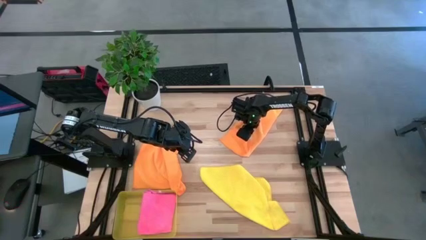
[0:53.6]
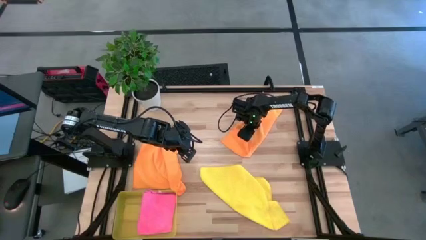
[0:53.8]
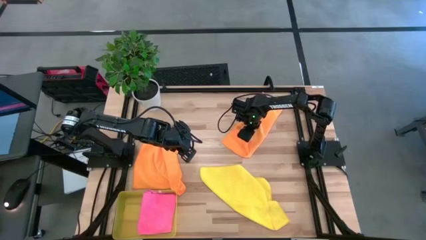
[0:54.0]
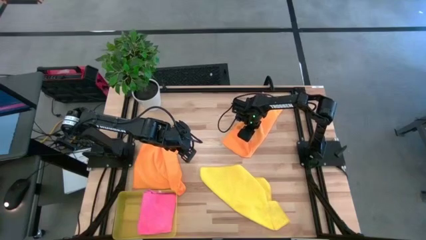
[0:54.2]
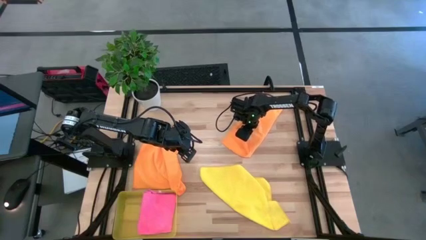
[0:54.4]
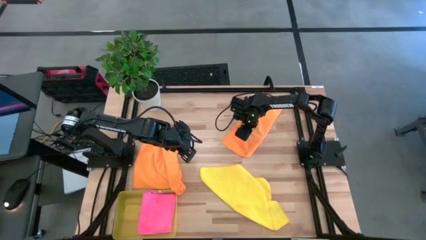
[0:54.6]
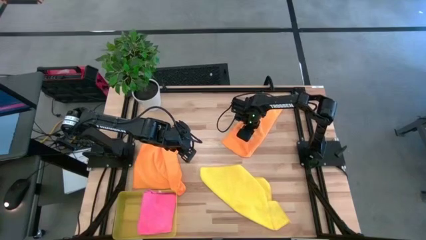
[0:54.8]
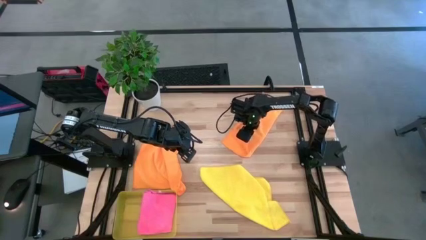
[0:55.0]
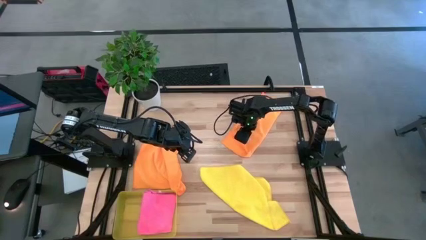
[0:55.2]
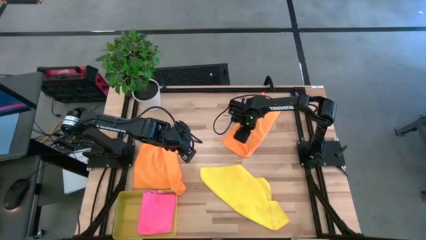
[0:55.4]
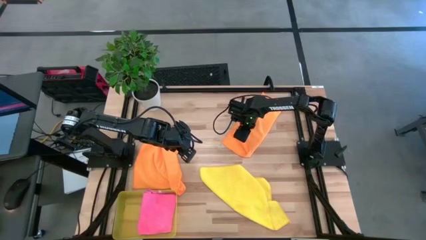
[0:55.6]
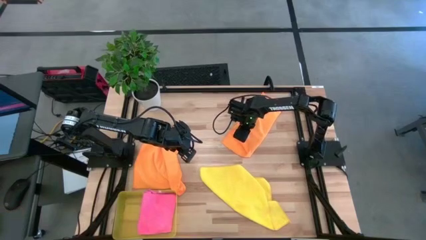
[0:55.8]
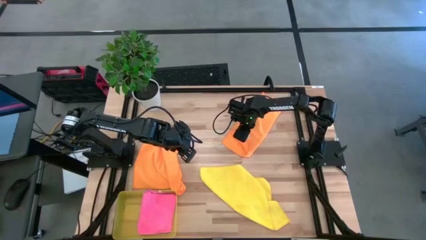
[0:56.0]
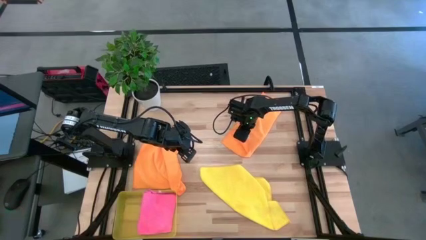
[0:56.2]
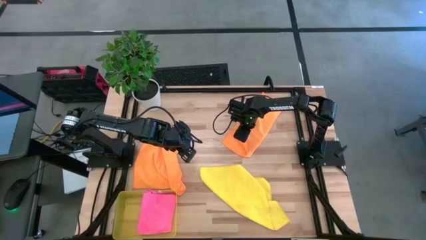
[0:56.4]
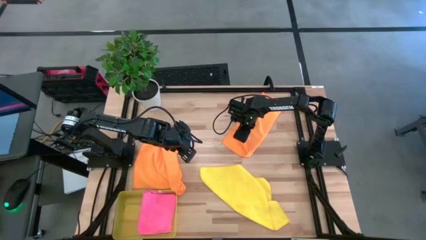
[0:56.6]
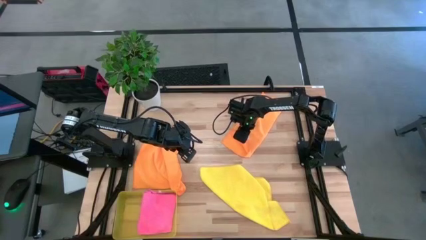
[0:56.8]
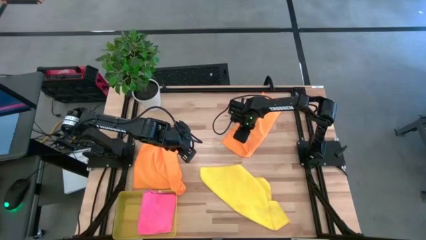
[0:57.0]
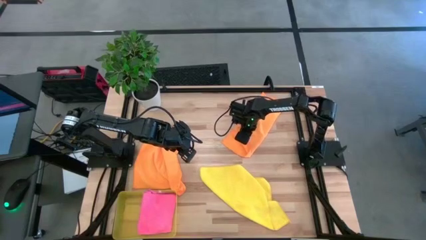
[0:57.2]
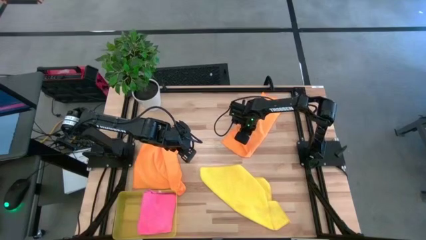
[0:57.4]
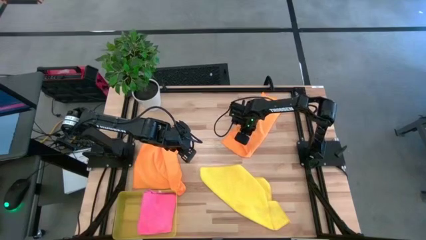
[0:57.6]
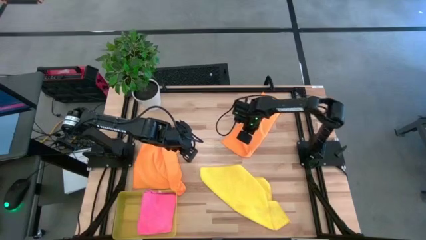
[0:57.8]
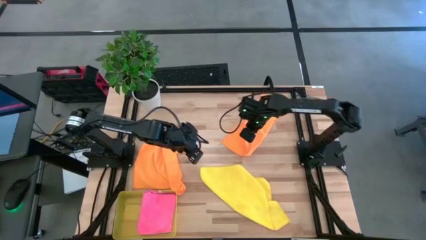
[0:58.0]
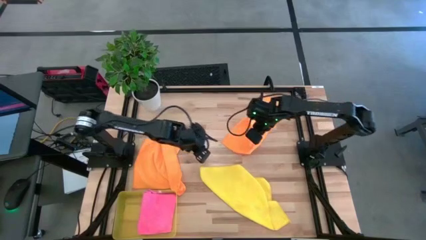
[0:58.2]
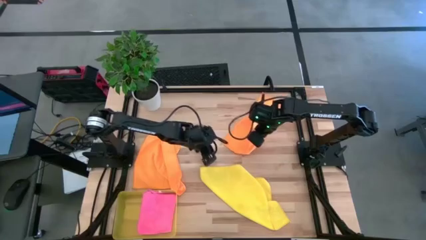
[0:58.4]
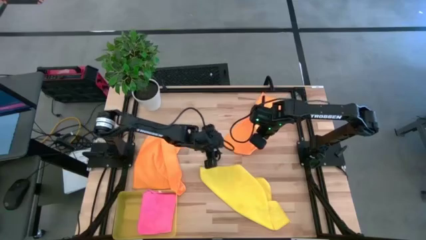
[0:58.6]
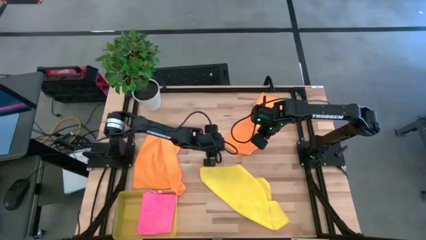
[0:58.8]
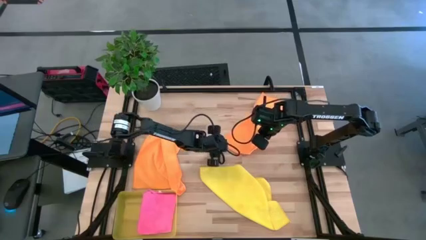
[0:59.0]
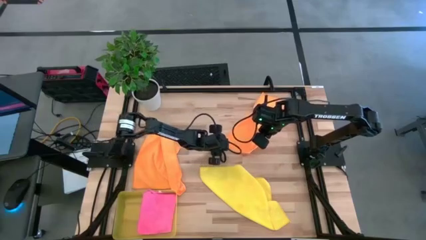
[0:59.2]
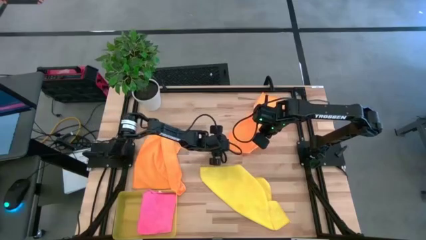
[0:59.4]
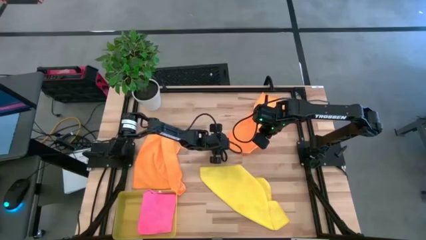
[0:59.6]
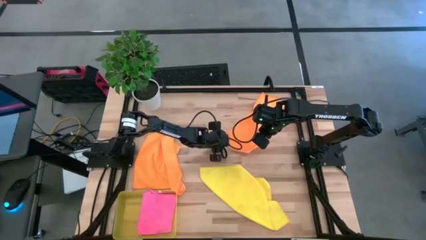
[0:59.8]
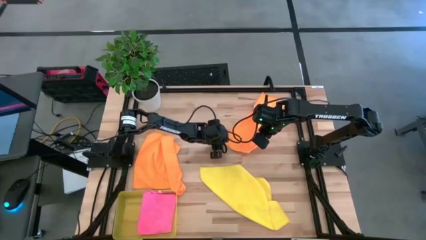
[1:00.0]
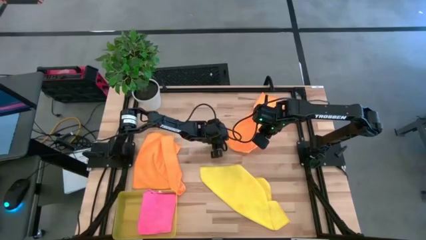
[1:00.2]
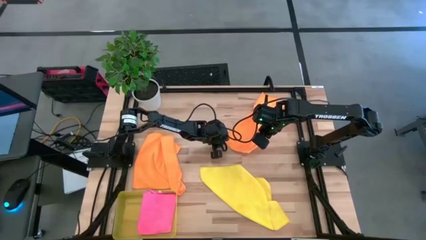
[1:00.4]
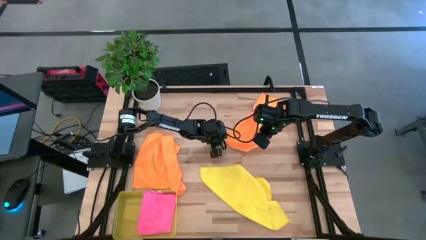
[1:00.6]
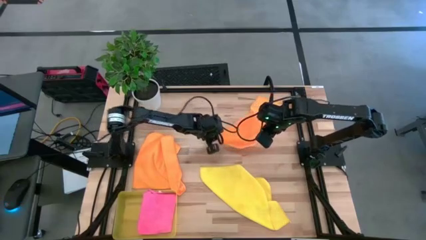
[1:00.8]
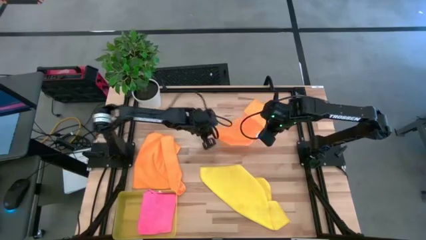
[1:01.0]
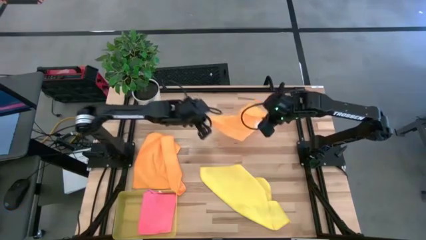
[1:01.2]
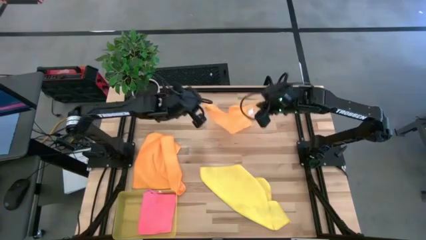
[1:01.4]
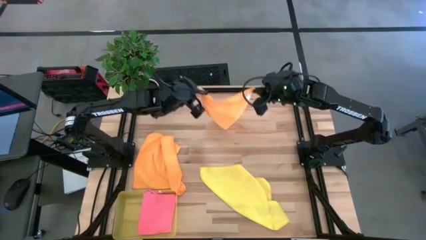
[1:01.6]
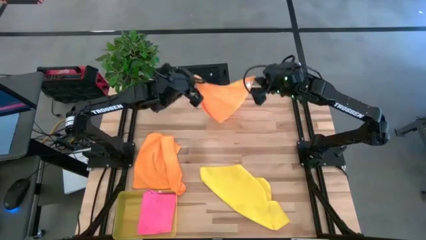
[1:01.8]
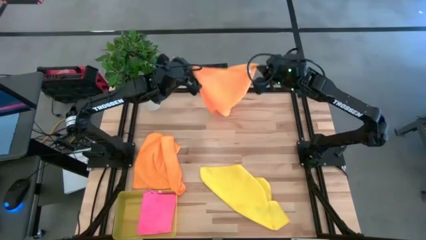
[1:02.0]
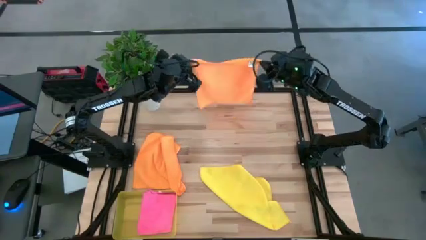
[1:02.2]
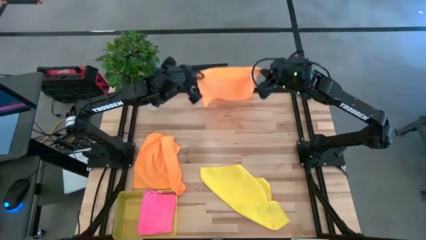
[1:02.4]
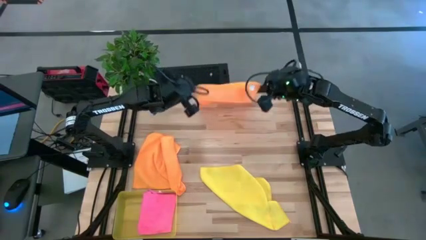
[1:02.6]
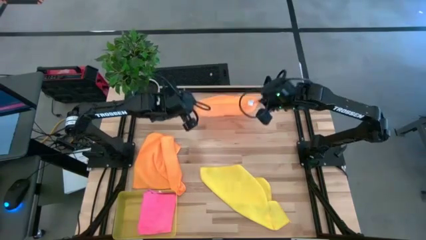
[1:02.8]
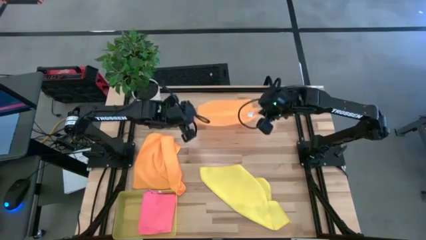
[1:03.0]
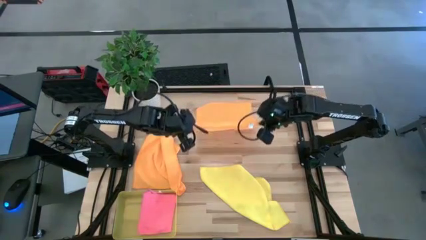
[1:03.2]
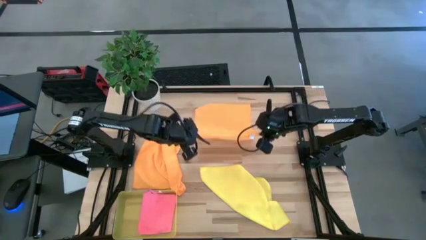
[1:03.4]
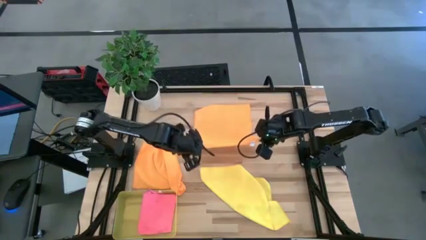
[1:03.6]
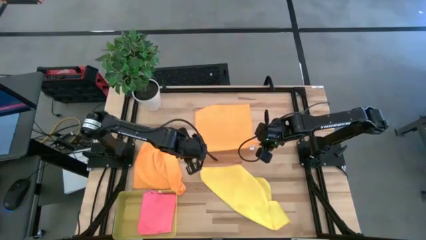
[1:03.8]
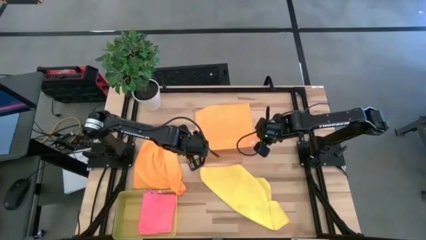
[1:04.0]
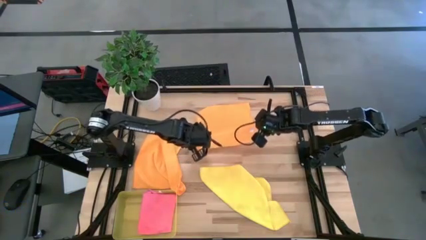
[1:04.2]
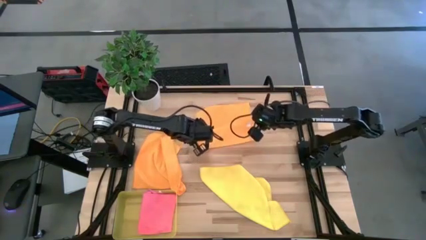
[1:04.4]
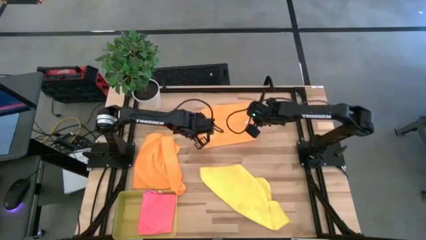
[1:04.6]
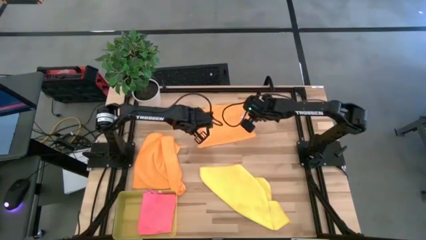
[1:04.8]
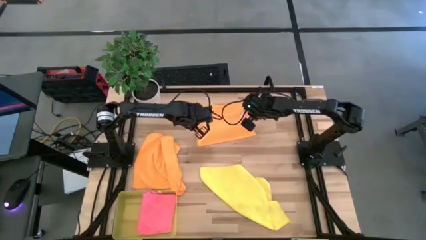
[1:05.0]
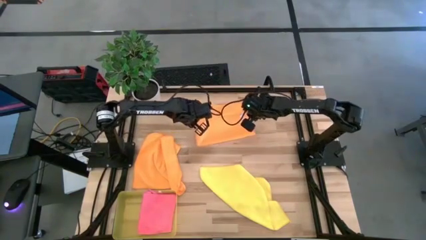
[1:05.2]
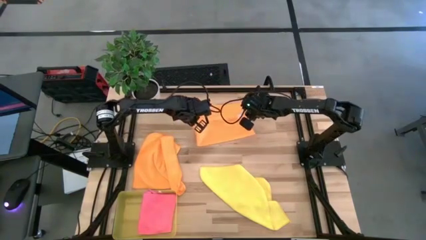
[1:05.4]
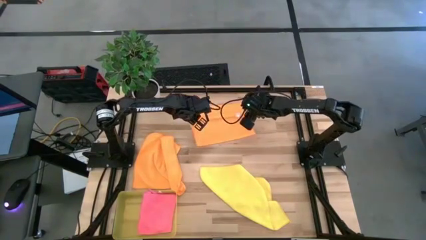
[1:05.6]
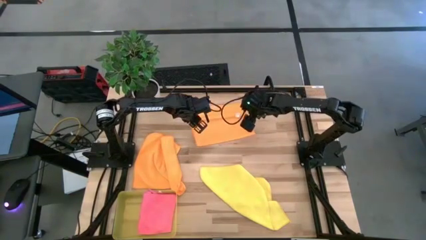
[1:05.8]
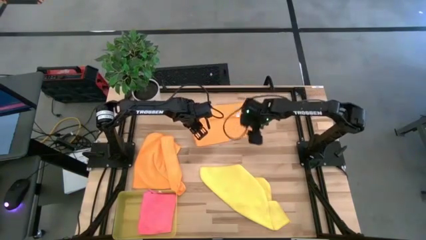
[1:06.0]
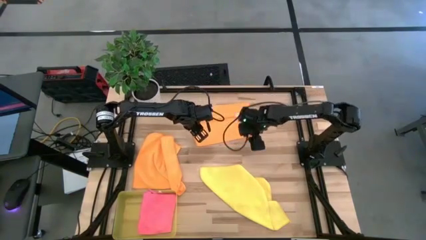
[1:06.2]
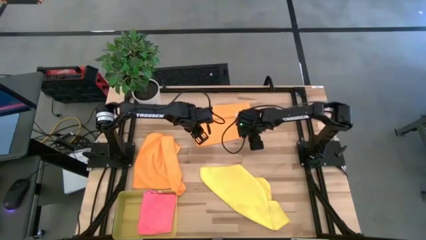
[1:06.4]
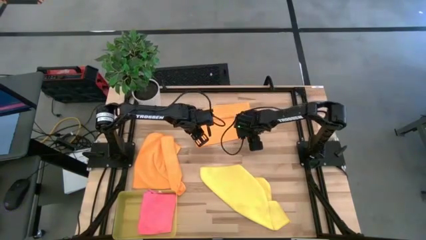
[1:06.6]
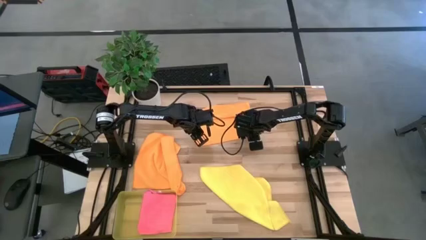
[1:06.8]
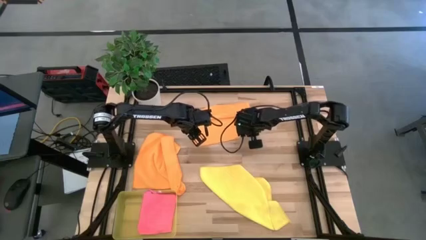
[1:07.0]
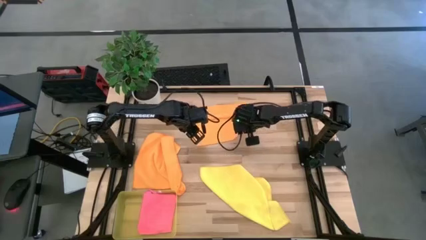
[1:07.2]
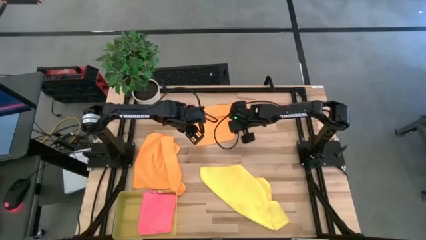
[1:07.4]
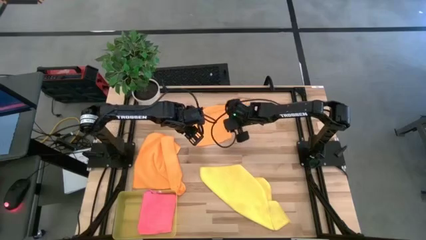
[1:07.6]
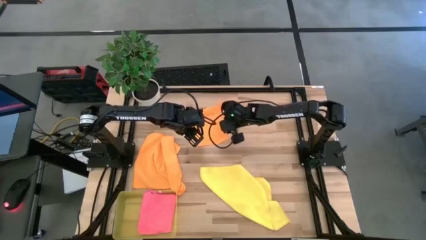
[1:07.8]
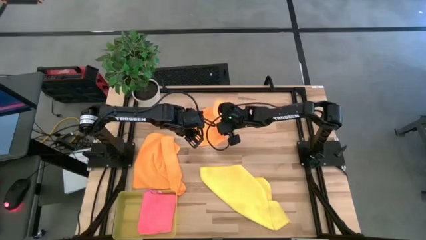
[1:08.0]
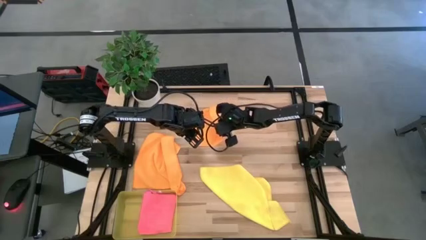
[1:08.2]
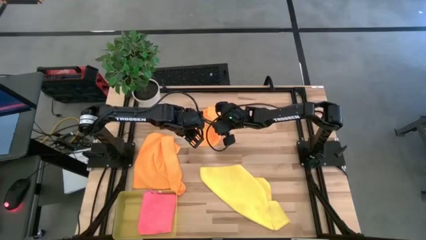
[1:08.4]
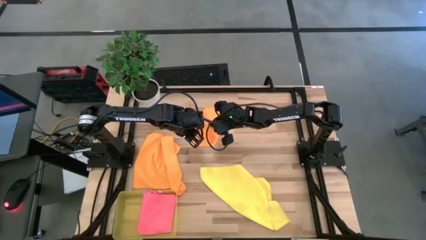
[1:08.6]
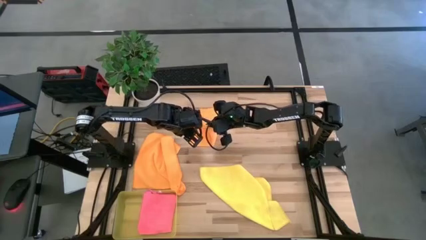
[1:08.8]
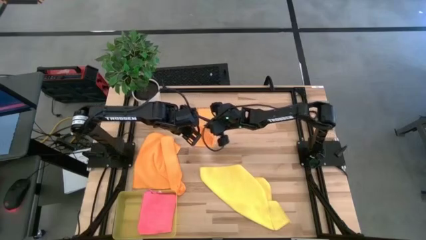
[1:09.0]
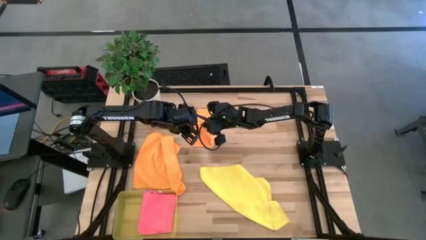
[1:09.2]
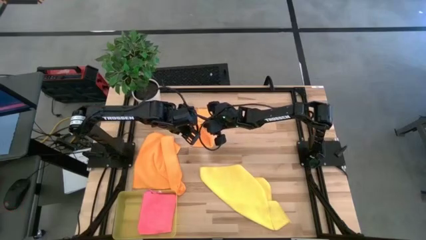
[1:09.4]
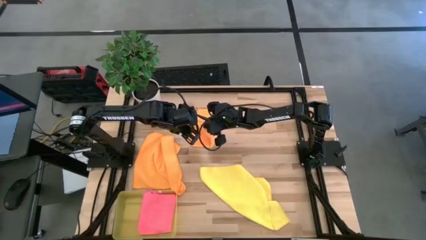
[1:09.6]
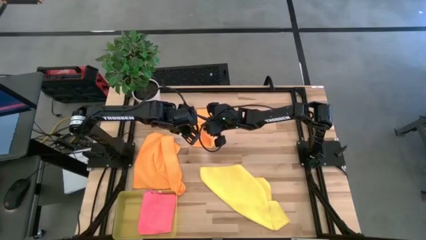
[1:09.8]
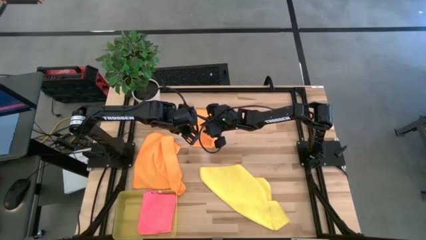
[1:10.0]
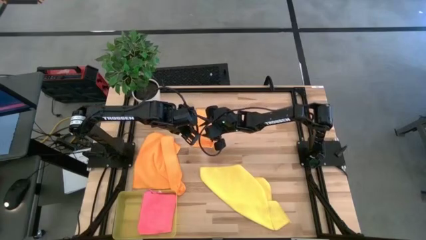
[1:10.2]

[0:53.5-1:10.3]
Task: Fold microfiber towels
Fold the top orange microfiber towel
